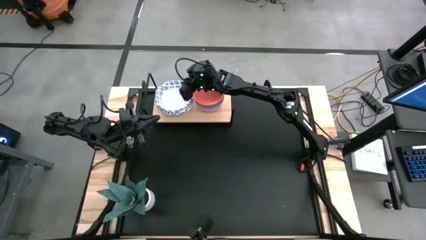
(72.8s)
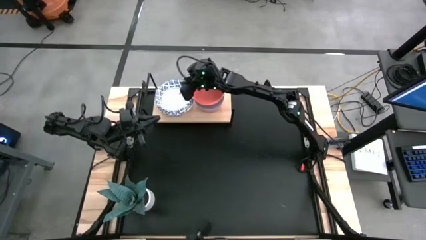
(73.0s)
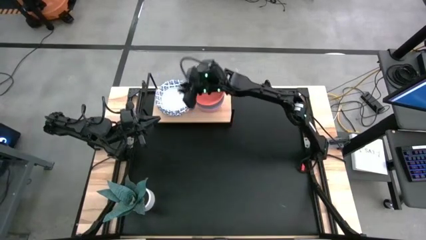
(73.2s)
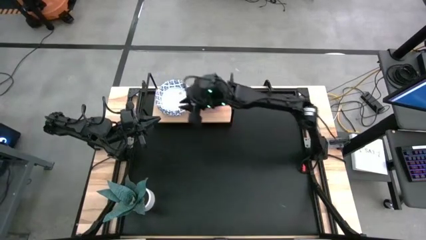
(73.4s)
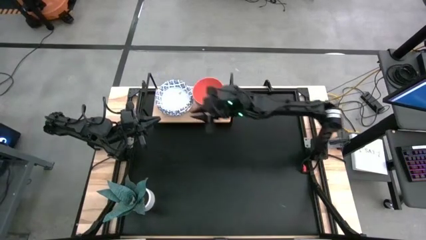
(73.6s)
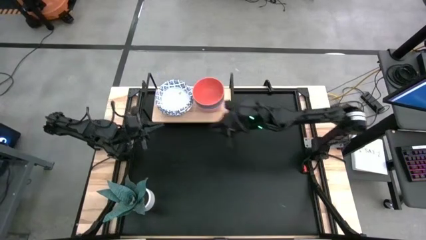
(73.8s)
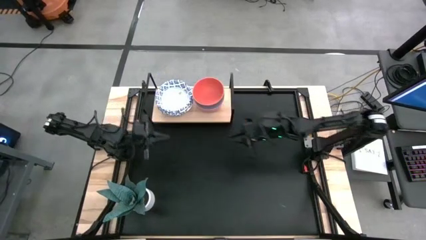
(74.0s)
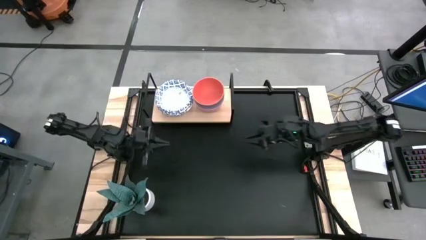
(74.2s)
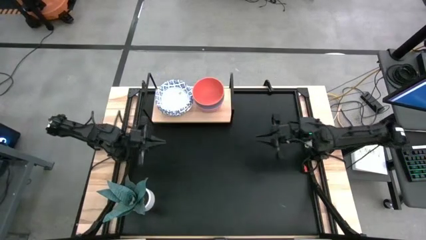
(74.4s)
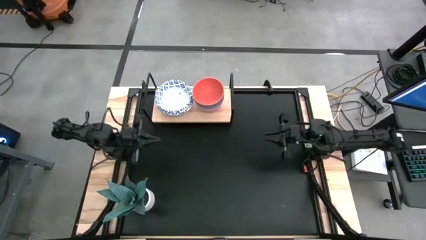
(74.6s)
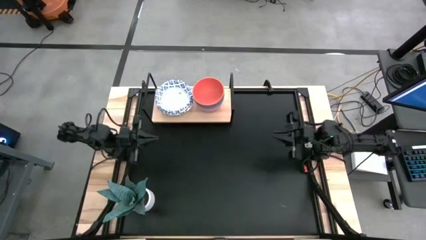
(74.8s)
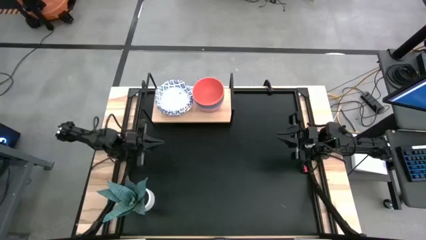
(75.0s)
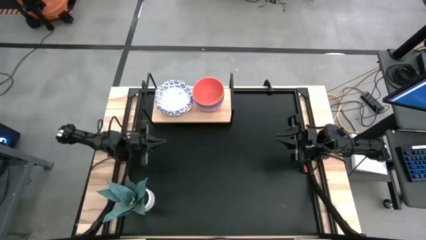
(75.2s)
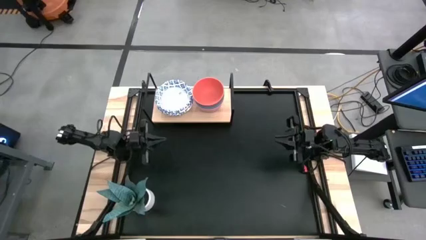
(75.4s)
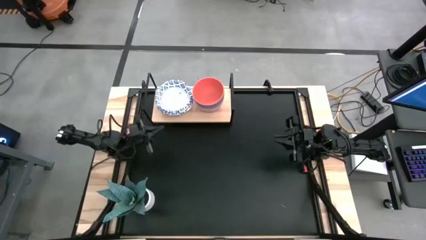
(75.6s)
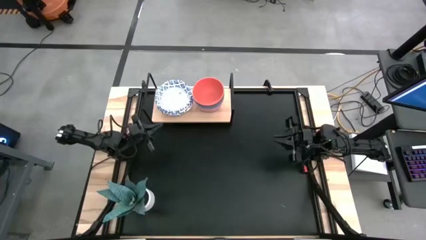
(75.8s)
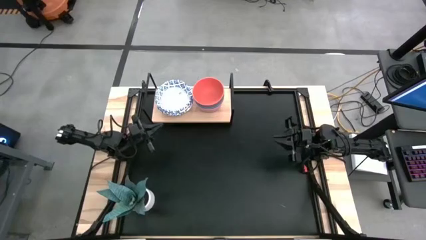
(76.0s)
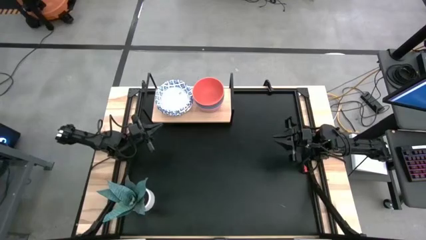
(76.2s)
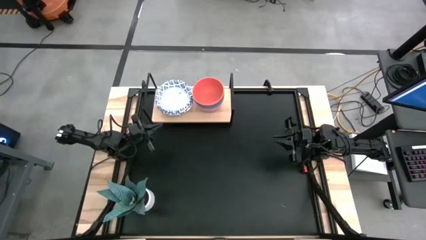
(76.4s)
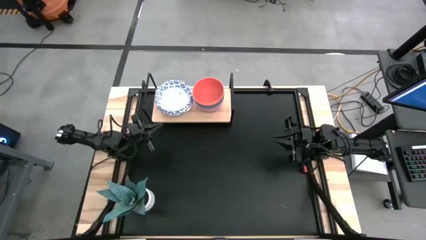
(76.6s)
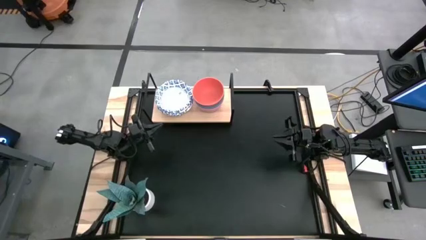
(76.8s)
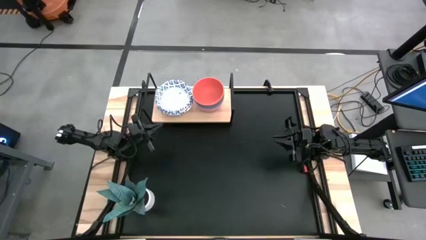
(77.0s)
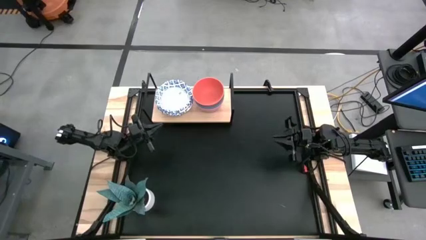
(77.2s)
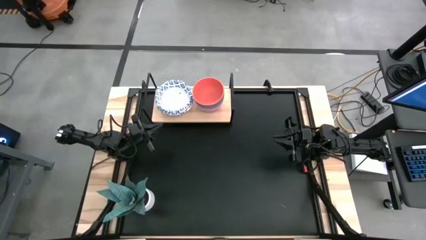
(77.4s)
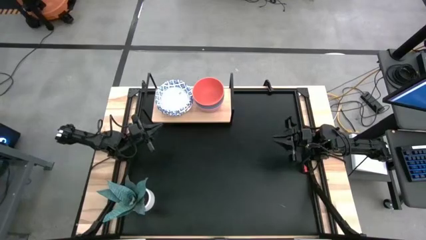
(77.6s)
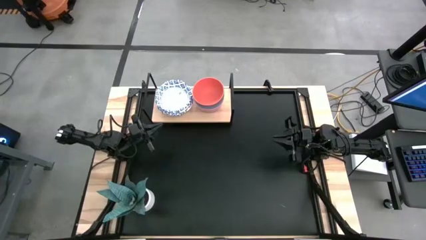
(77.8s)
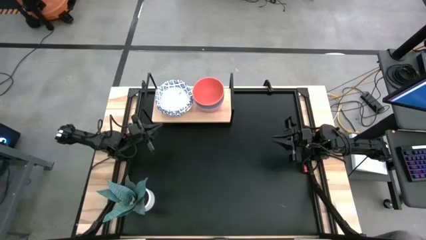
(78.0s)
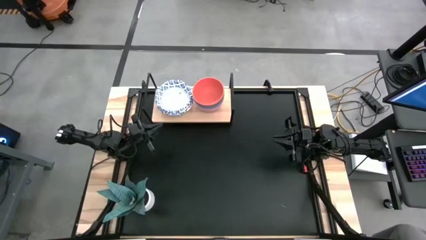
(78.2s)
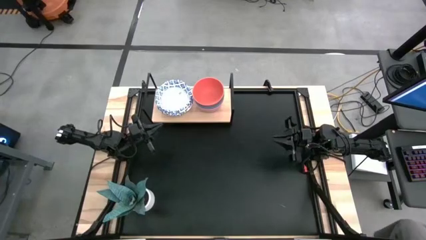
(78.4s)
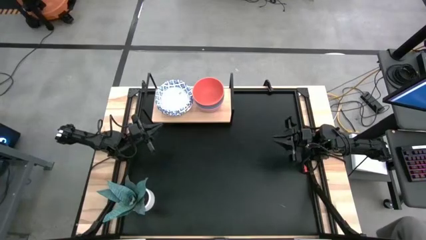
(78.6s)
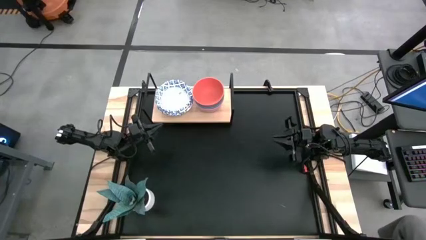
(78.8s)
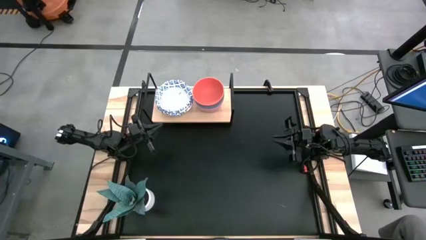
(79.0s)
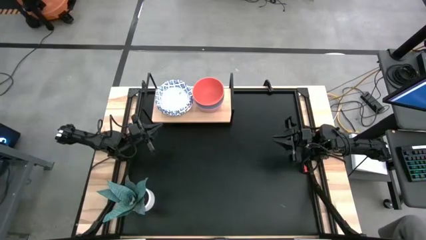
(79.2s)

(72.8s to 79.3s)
Task: Place and stack bowls onto a shelf
Return to Home Position

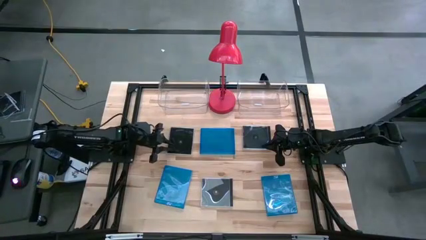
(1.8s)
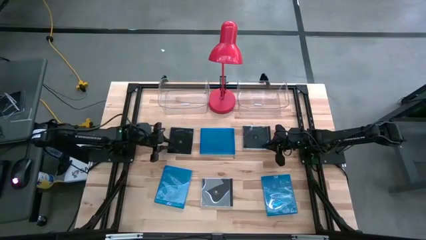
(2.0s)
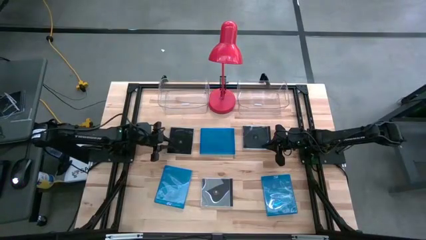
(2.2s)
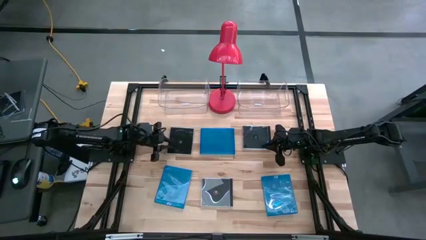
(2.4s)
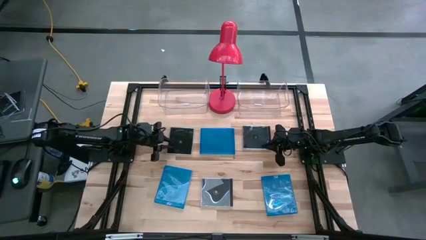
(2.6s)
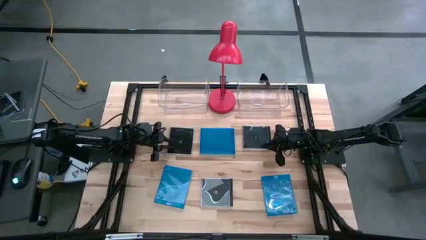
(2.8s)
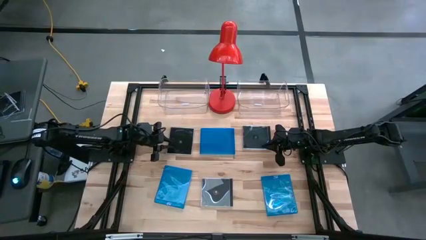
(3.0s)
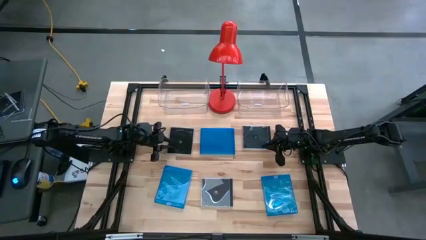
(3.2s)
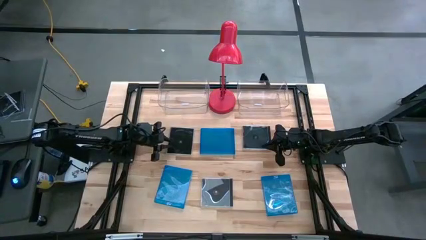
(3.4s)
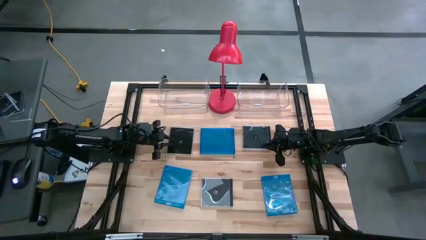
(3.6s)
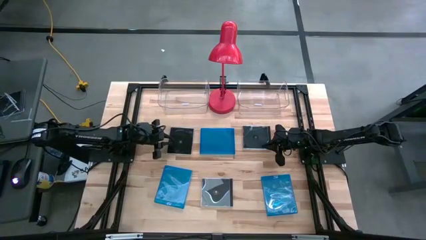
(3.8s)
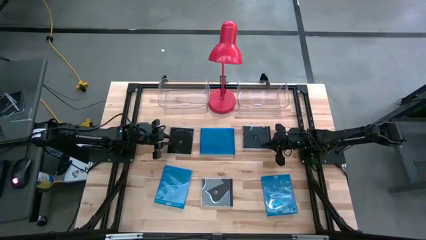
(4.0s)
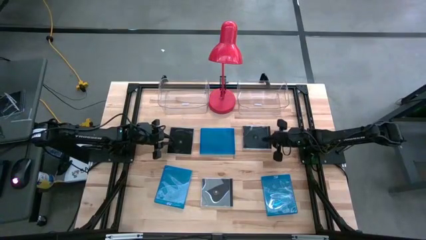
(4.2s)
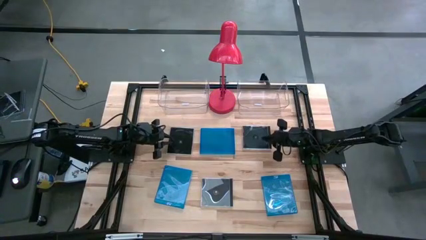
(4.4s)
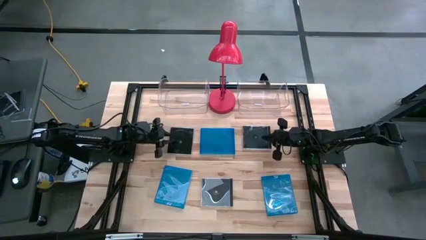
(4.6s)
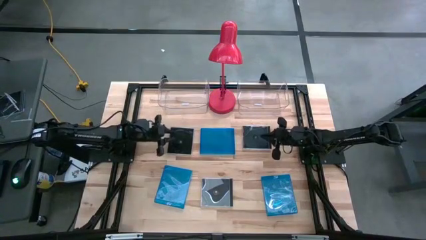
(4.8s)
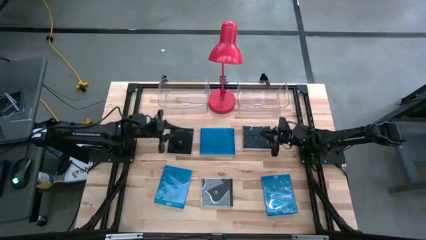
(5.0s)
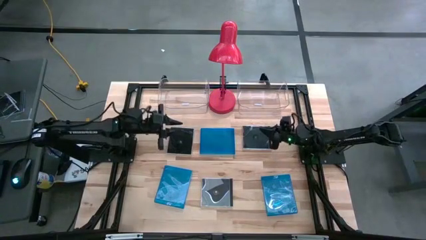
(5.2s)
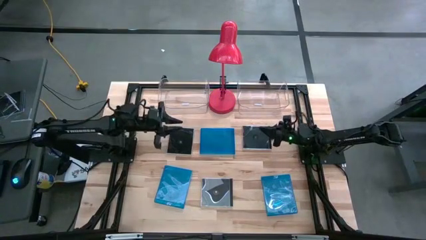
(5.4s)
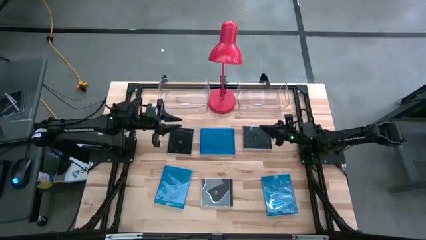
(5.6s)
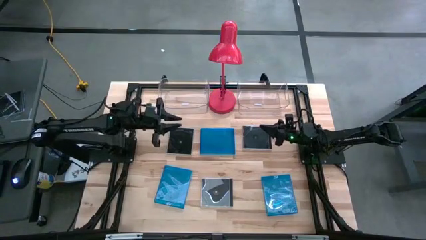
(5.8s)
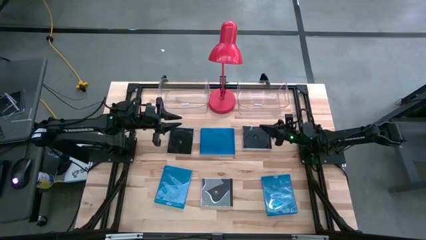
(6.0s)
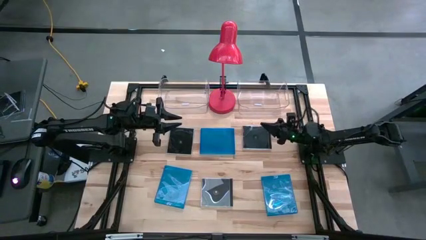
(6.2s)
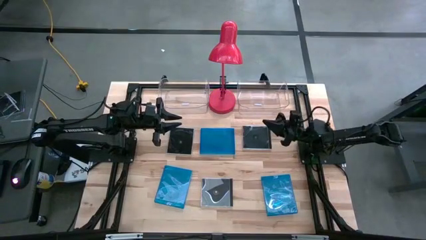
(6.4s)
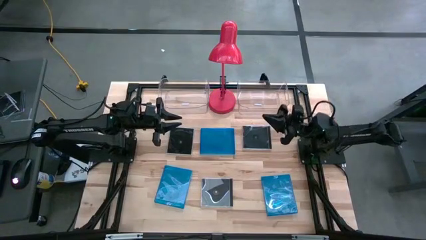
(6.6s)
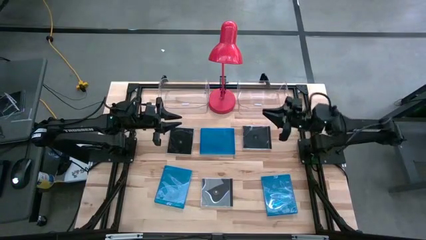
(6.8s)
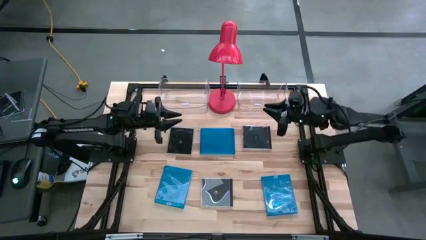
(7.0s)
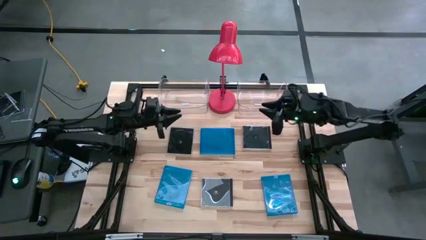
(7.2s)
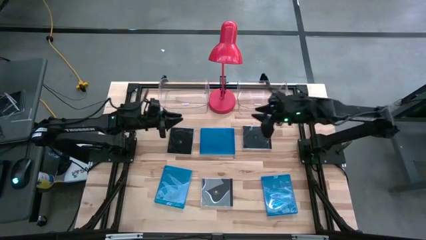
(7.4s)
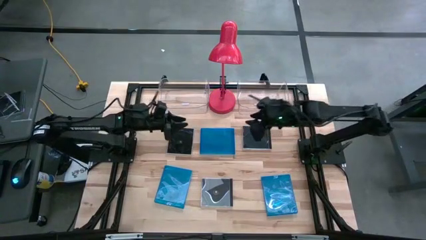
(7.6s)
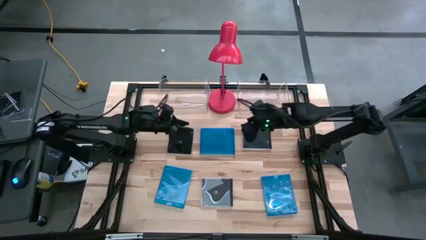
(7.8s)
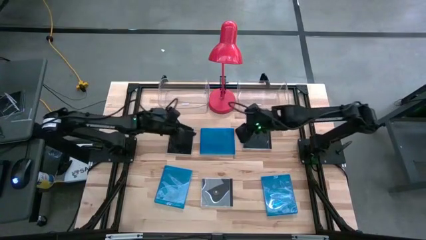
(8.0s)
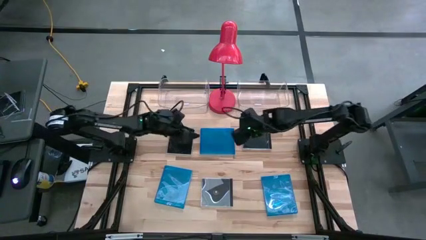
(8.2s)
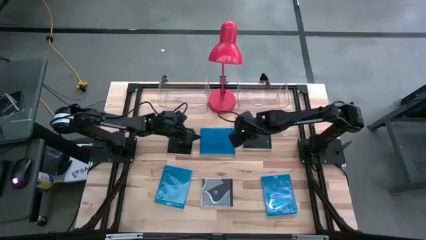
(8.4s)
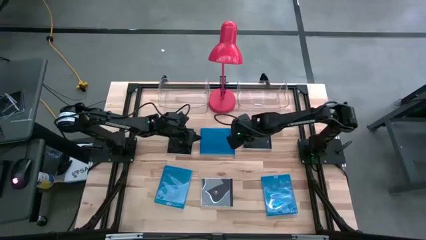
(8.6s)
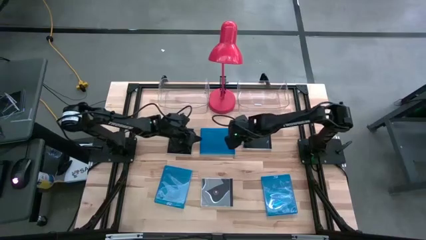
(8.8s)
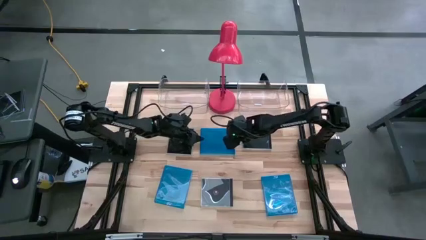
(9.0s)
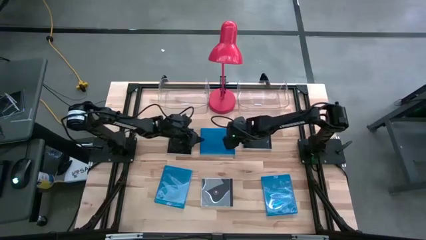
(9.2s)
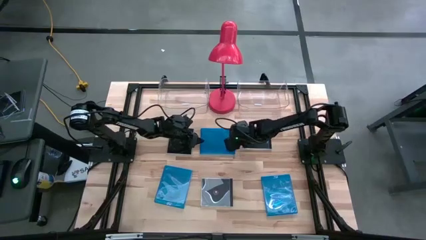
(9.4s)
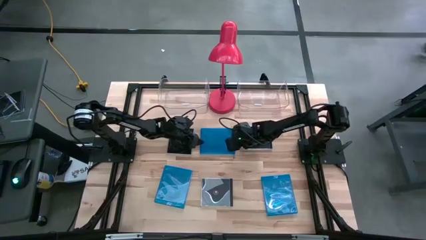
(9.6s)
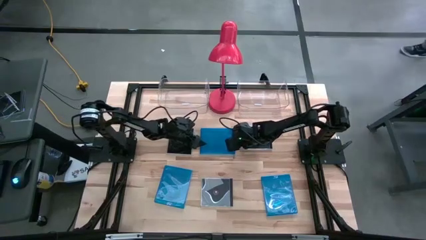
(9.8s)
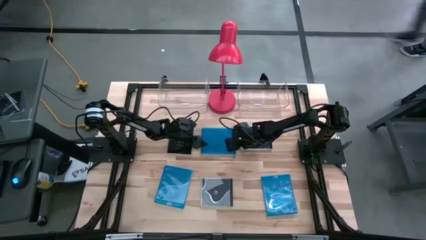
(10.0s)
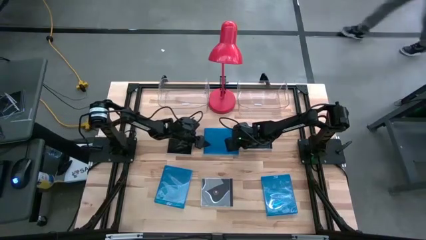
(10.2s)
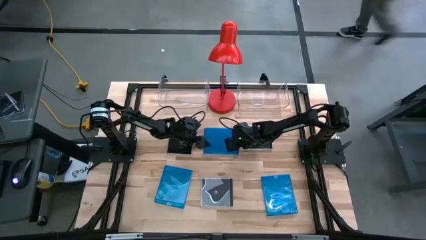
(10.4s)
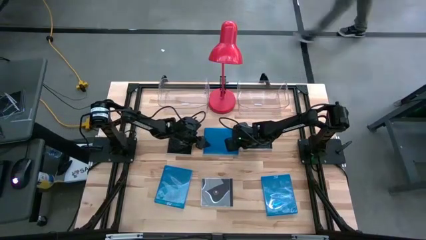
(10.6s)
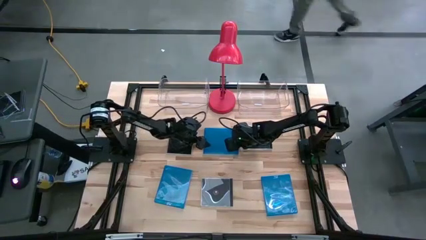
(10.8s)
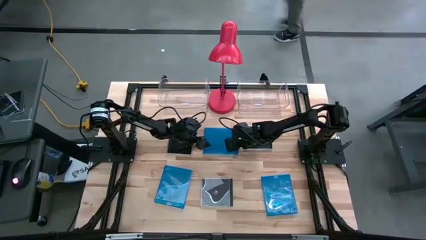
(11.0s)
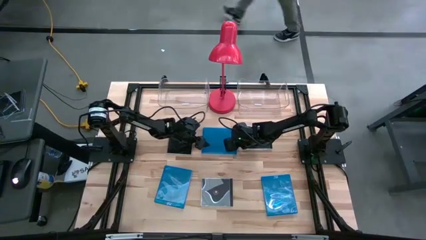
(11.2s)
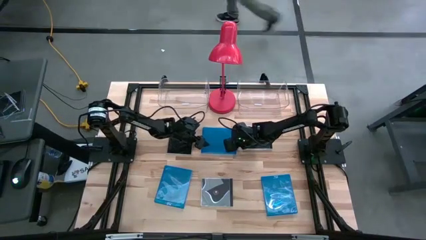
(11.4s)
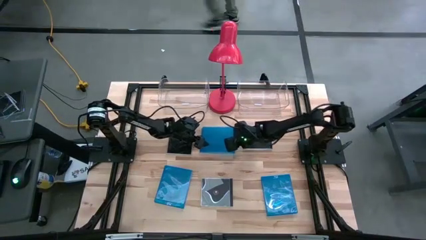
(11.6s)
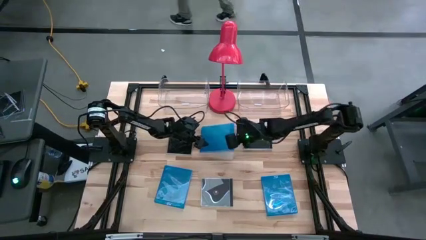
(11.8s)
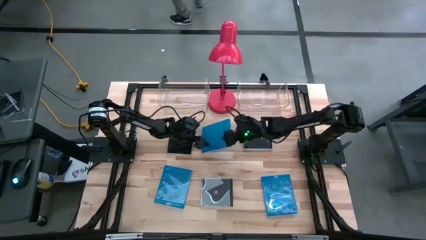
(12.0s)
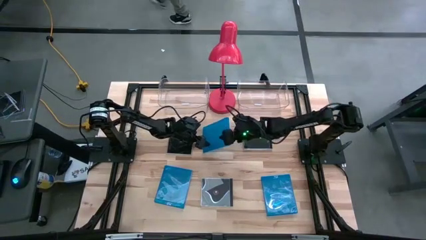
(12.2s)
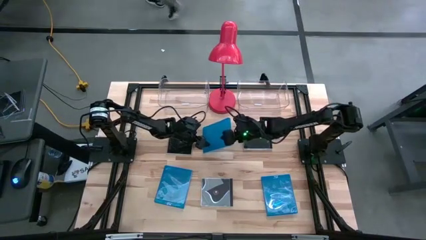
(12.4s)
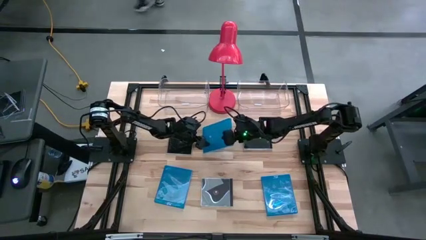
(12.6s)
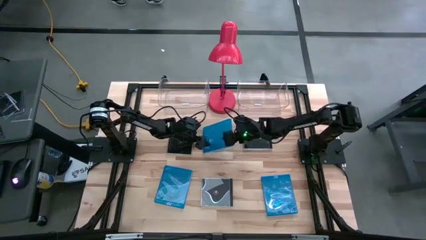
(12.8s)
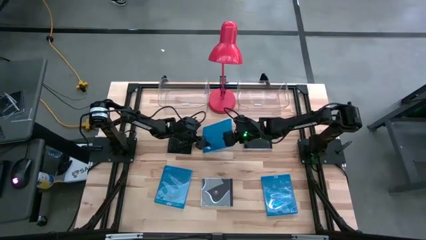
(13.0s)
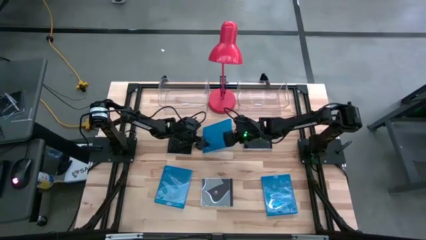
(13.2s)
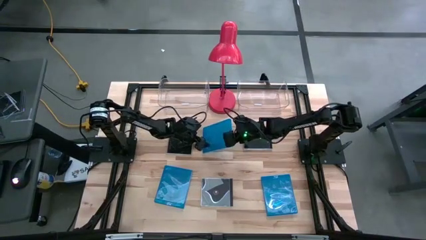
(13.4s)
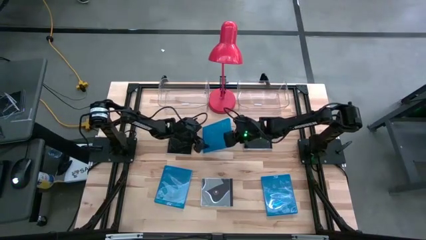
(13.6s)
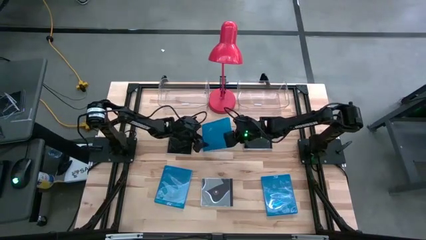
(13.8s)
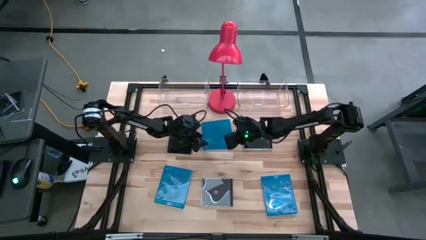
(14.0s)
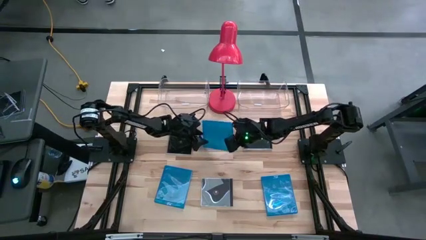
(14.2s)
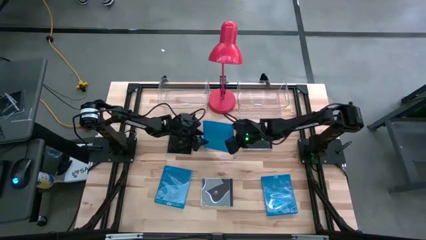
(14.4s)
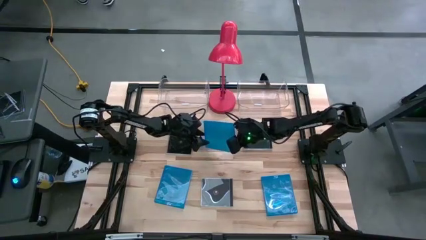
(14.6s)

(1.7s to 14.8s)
Task: Pick & place jewel cases by type
Put the top blue cd case into the left transparent bin
